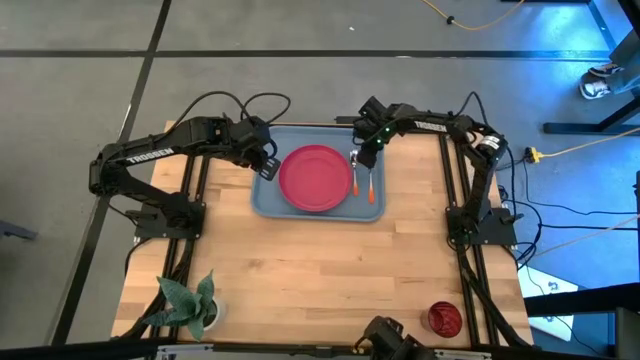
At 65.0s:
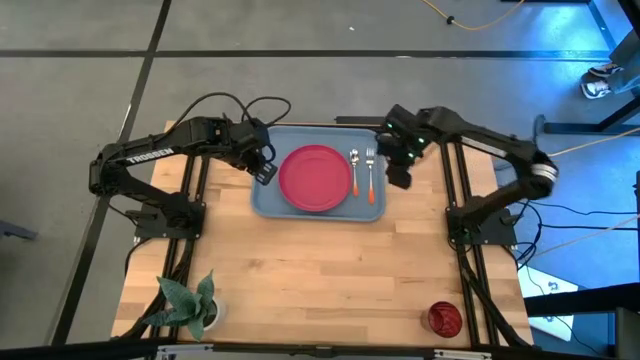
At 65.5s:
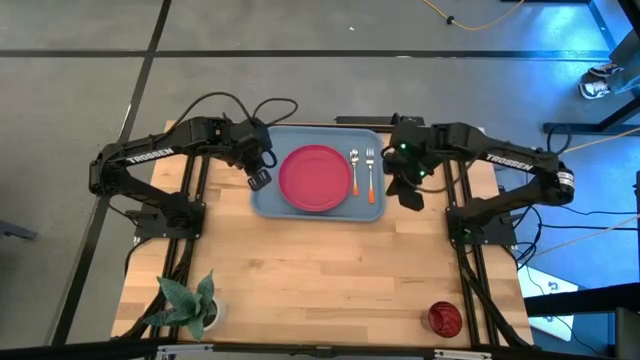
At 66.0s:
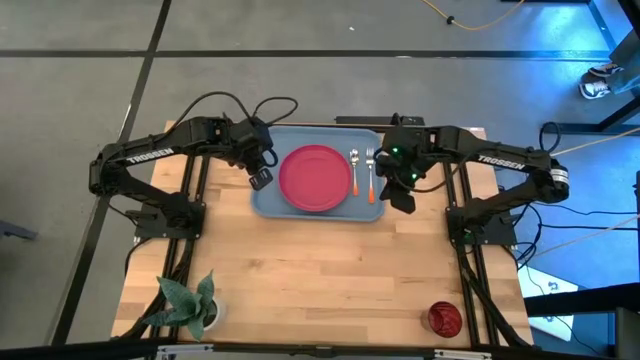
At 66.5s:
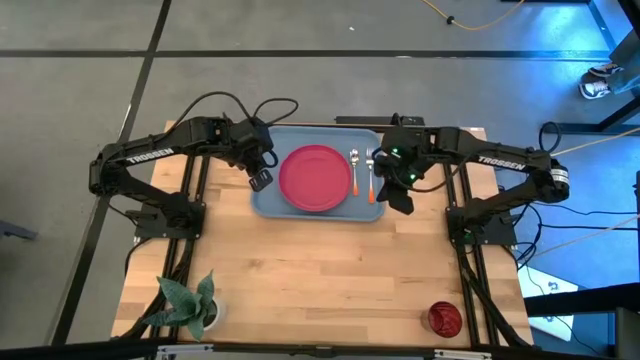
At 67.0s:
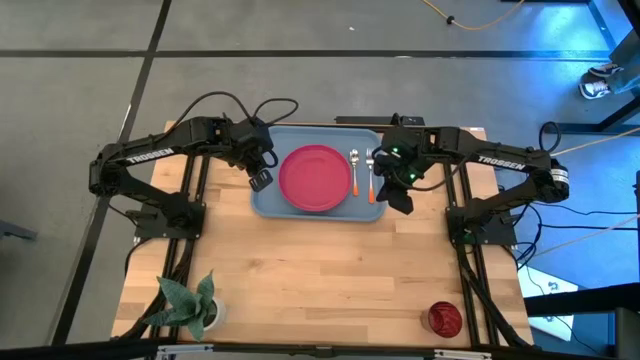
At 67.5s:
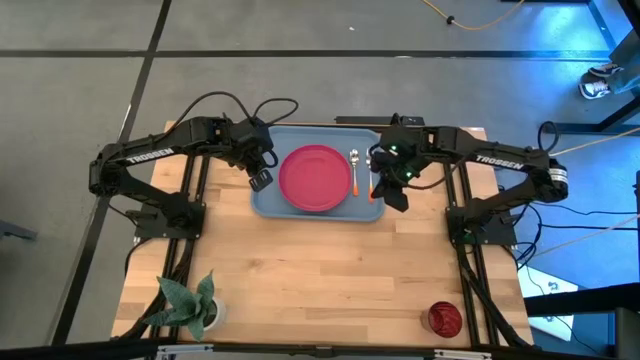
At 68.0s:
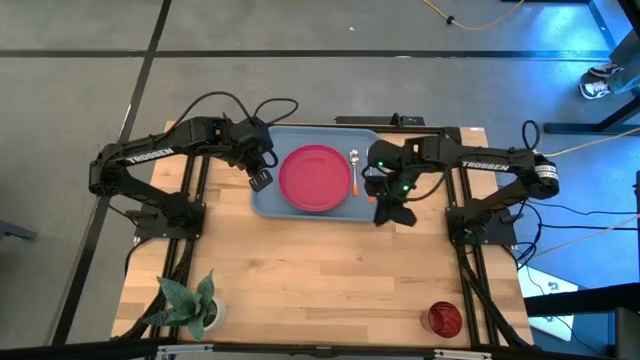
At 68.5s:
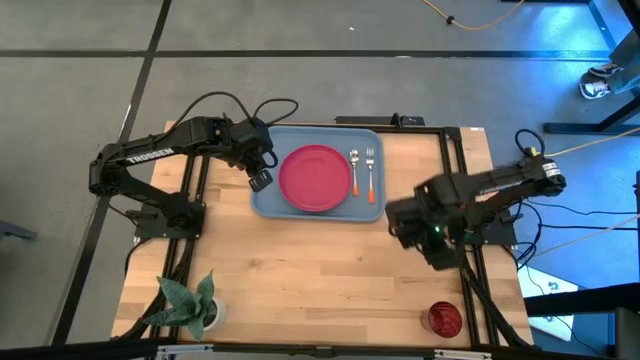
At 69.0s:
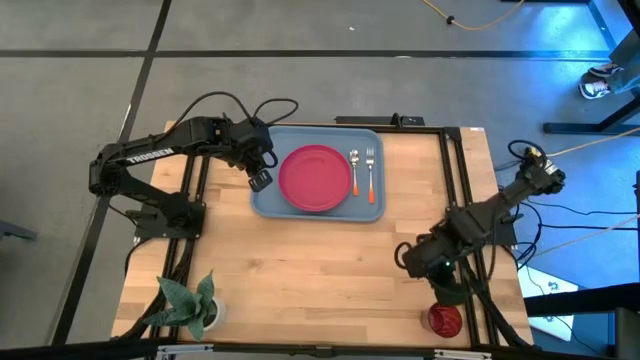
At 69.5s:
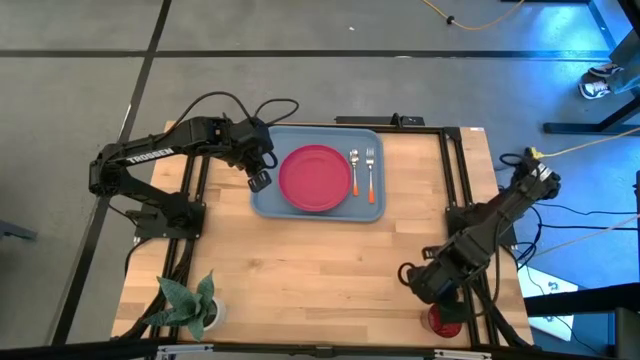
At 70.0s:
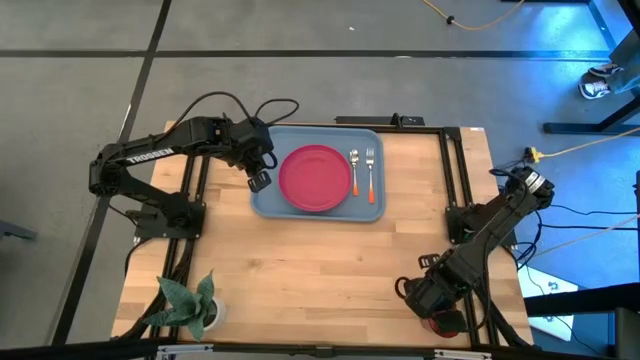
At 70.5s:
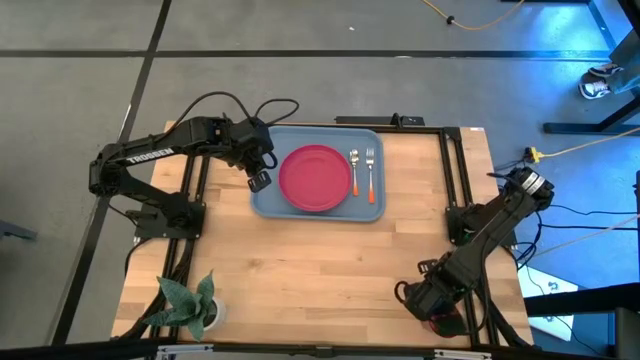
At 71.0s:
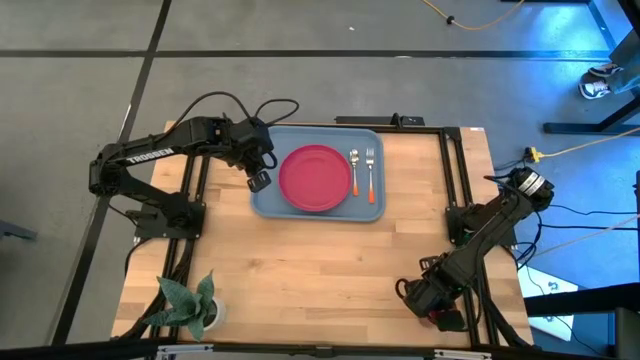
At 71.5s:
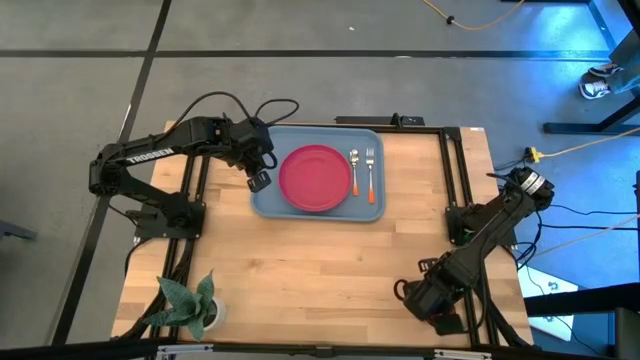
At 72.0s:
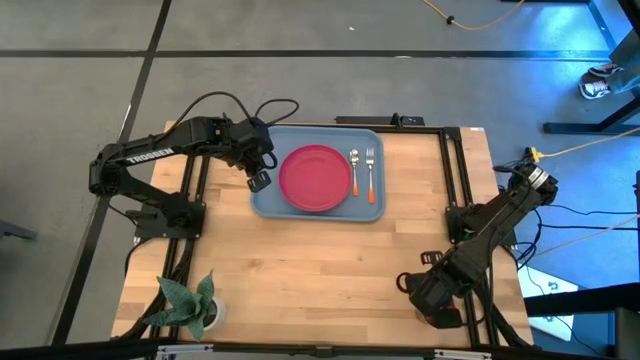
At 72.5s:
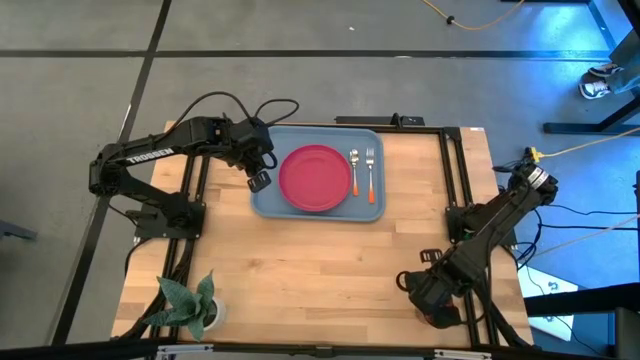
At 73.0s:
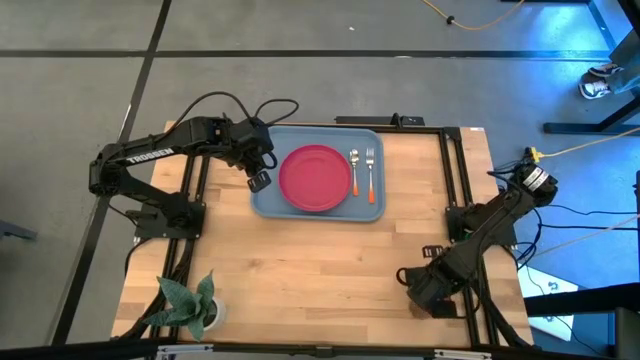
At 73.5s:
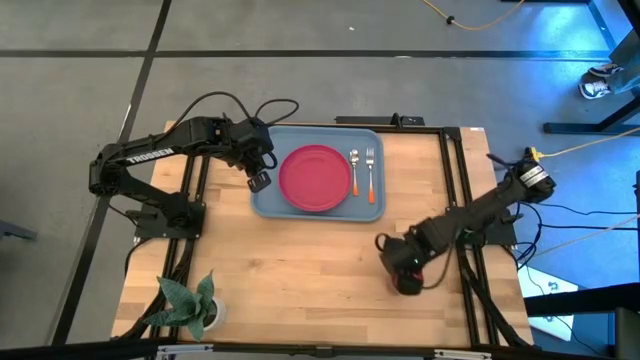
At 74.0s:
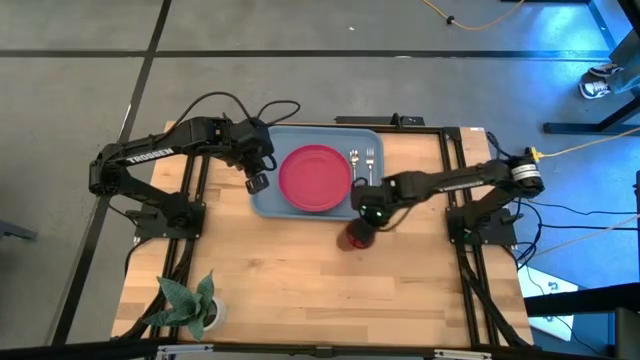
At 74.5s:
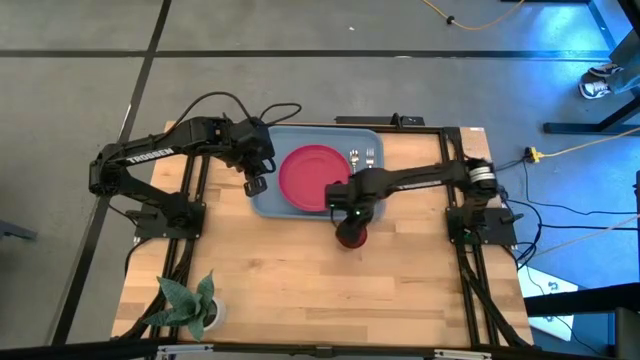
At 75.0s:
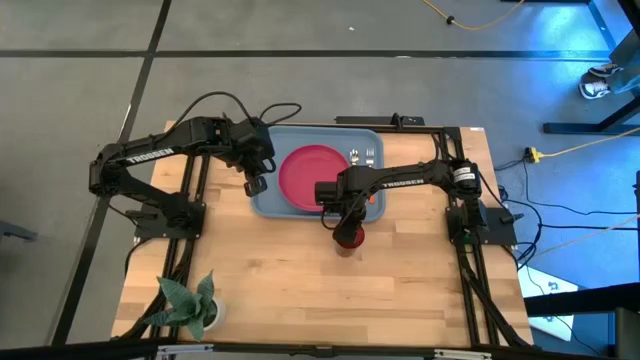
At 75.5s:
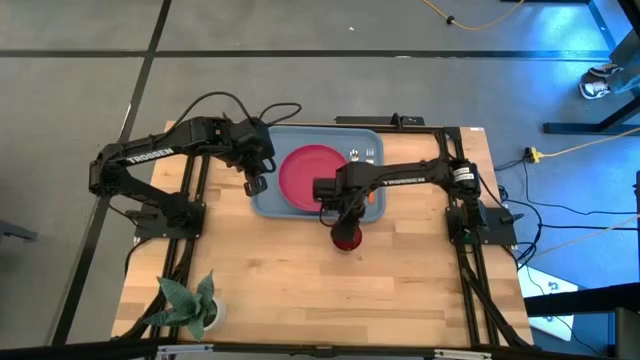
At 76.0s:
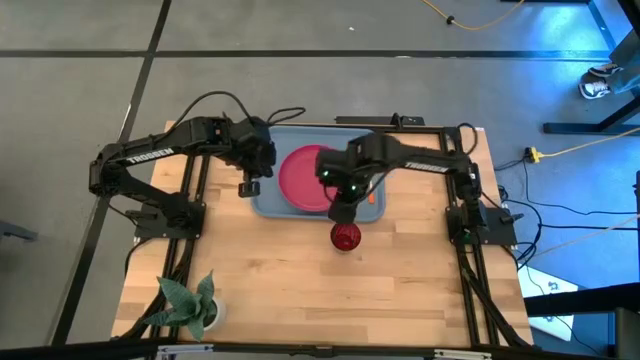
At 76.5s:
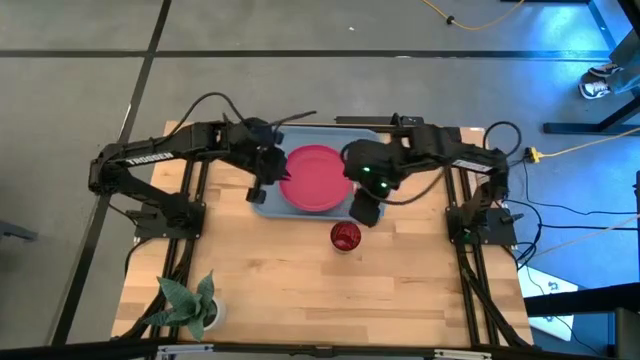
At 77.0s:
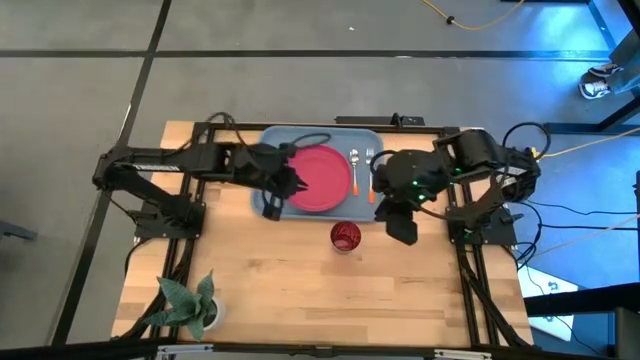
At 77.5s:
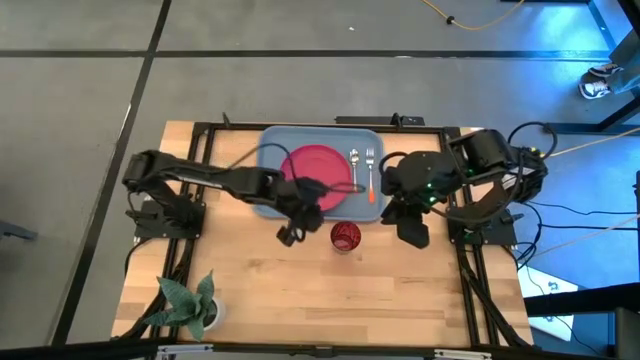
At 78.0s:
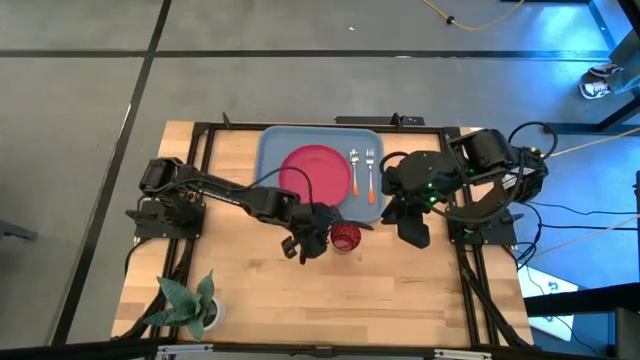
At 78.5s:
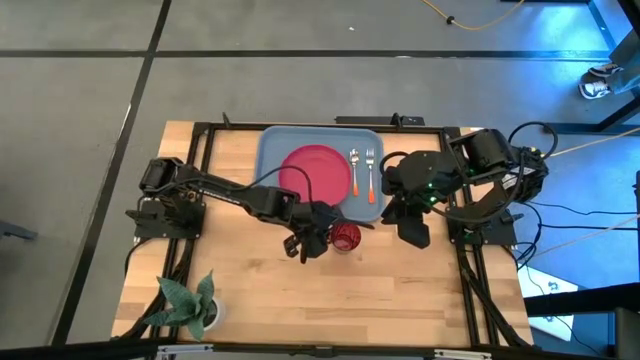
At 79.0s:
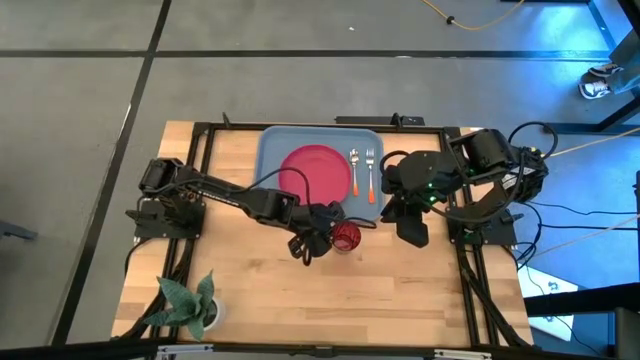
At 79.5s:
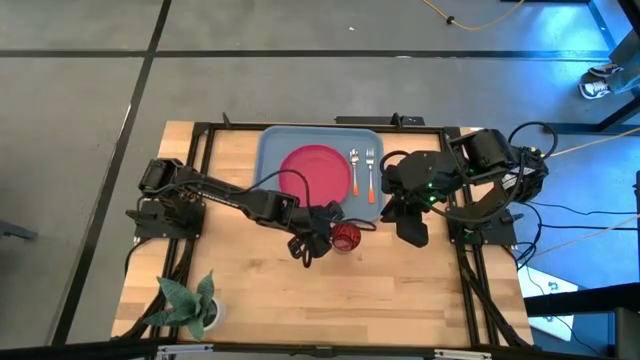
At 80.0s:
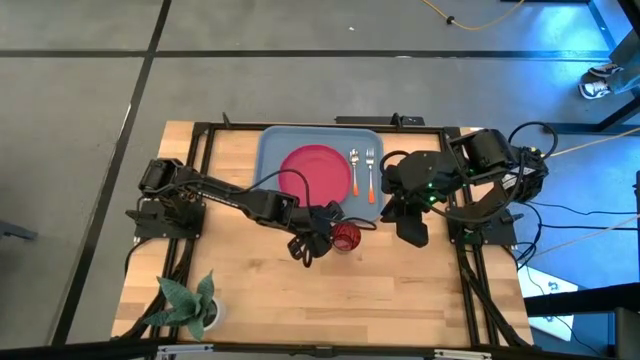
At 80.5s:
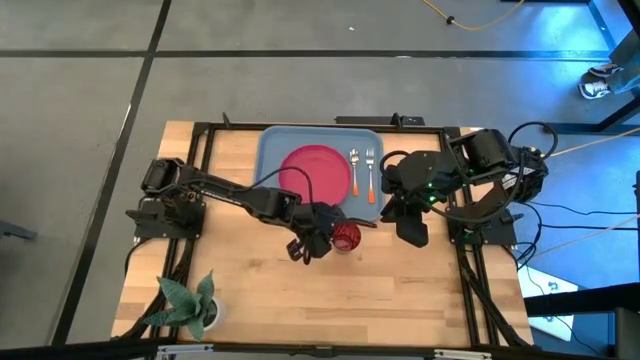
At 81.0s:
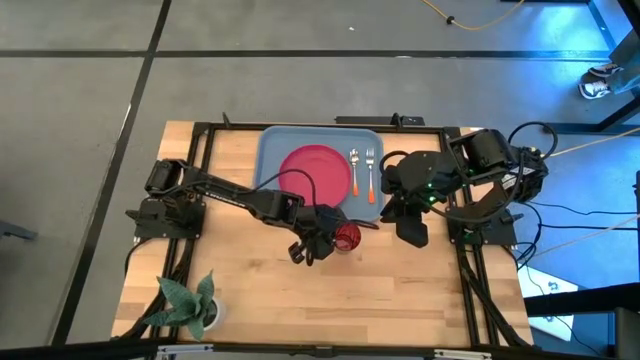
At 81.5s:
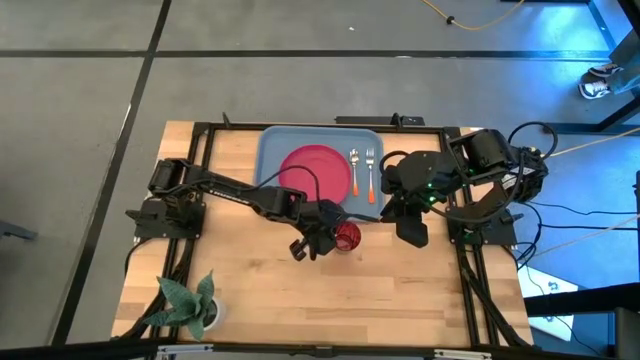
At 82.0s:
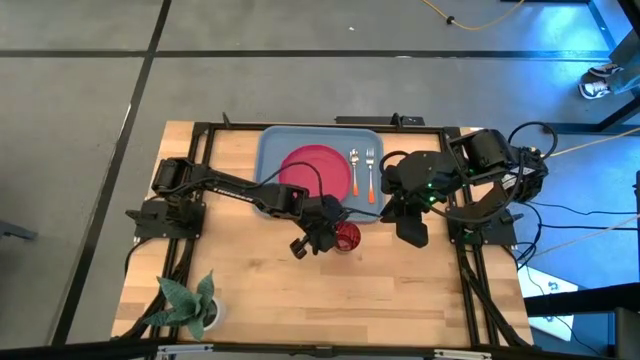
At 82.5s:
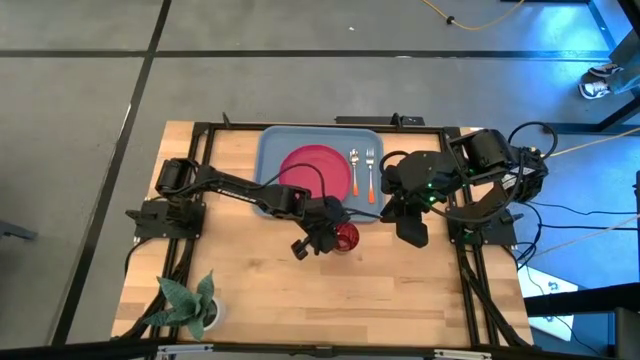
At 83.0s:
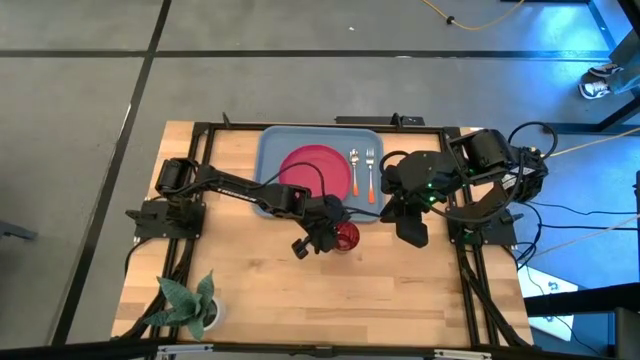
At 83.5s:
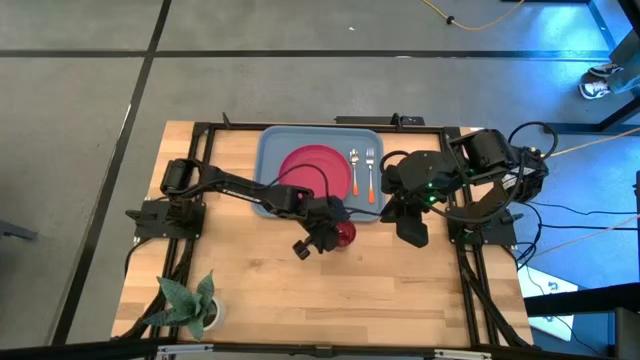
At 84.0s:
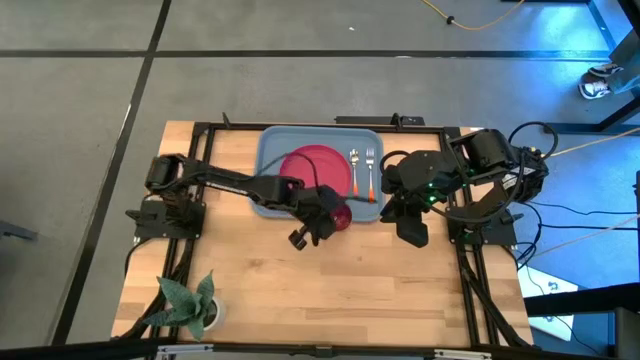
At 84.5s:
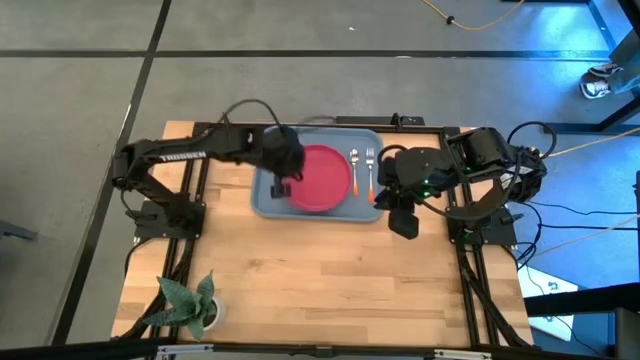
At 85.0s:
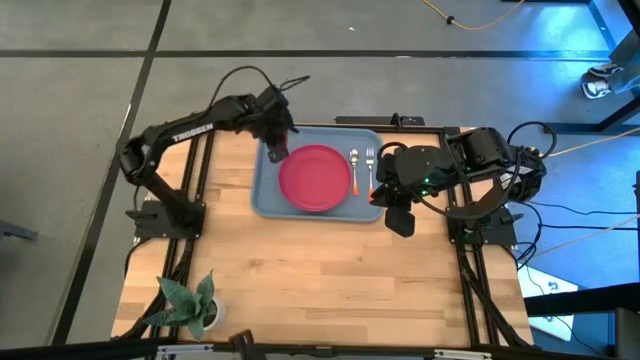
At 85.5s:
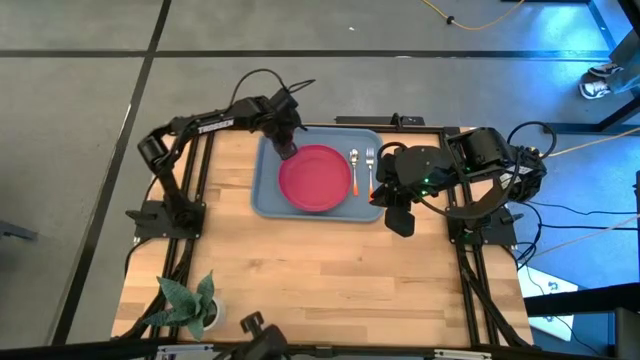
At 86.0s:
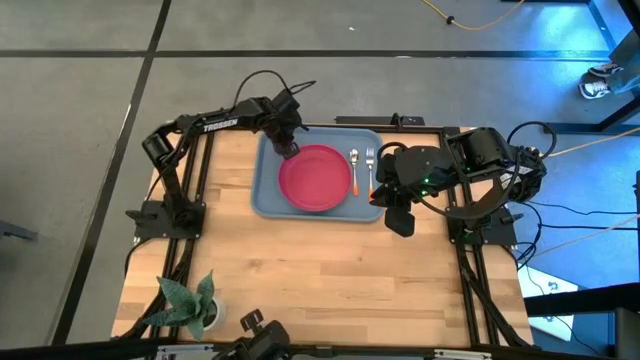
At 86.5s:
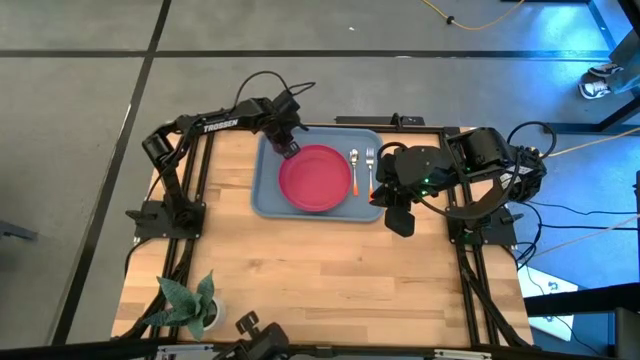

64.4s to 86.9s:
Task: Pick and place plate/cup/fork/spoon on tray
Put the red glass on the blue serving tray at the top left of the pink plate
